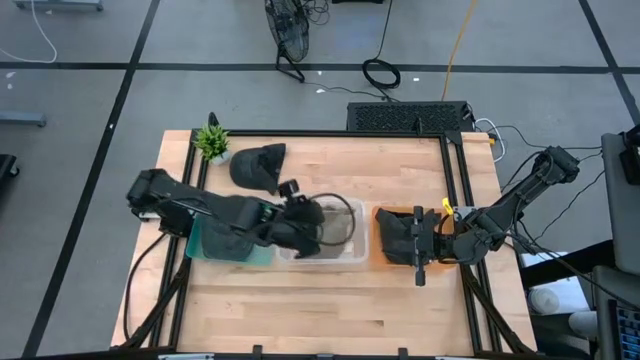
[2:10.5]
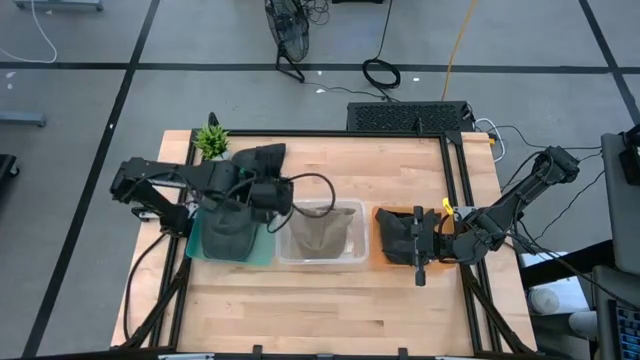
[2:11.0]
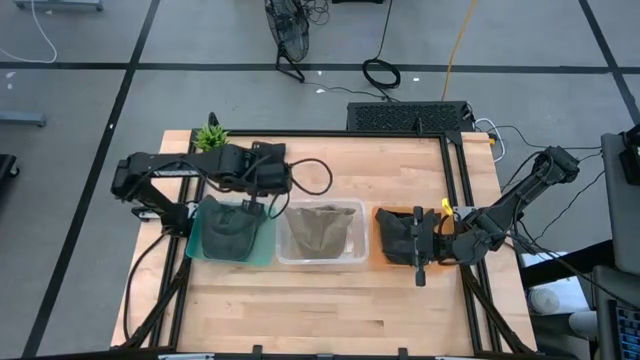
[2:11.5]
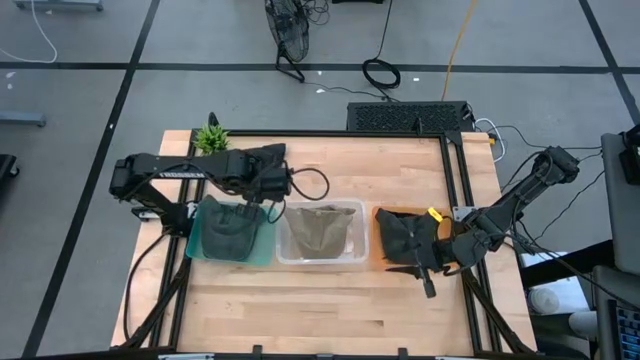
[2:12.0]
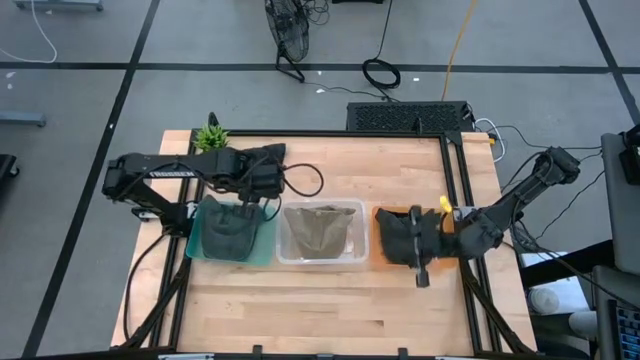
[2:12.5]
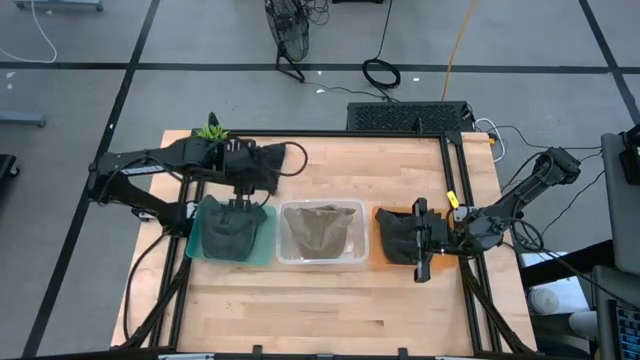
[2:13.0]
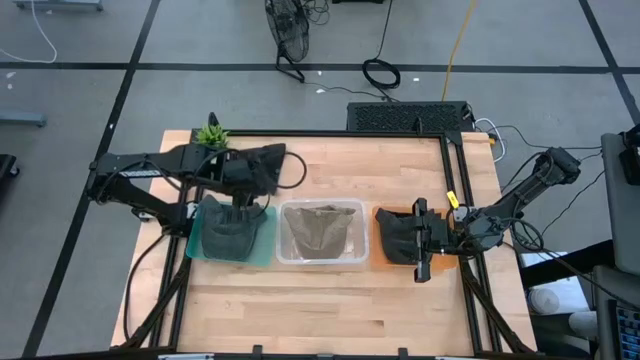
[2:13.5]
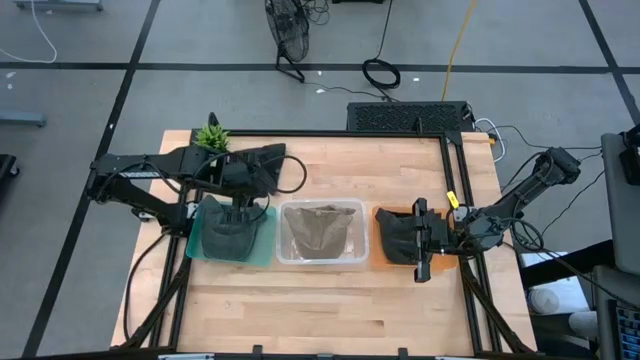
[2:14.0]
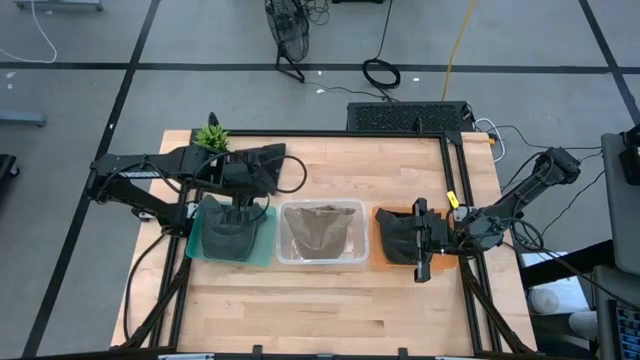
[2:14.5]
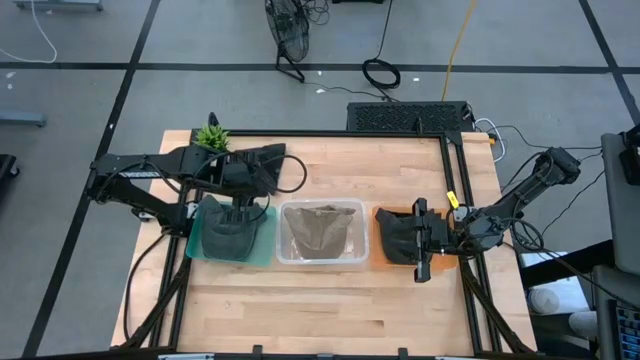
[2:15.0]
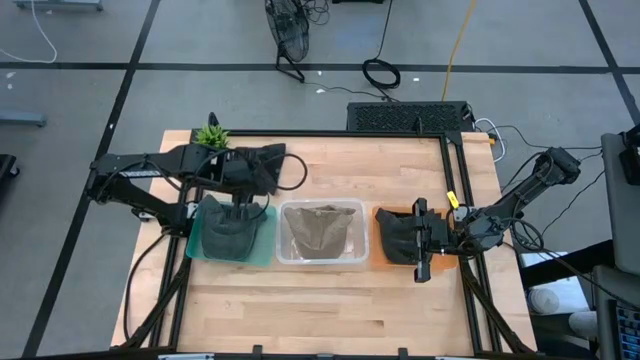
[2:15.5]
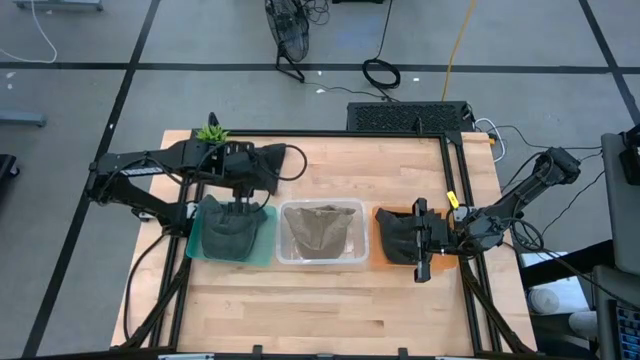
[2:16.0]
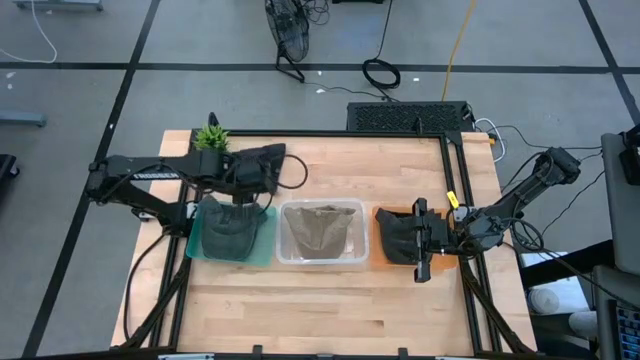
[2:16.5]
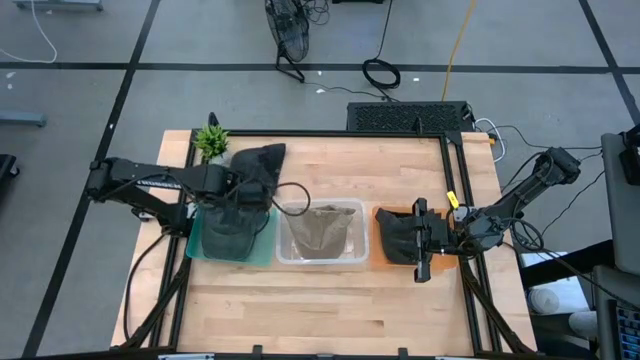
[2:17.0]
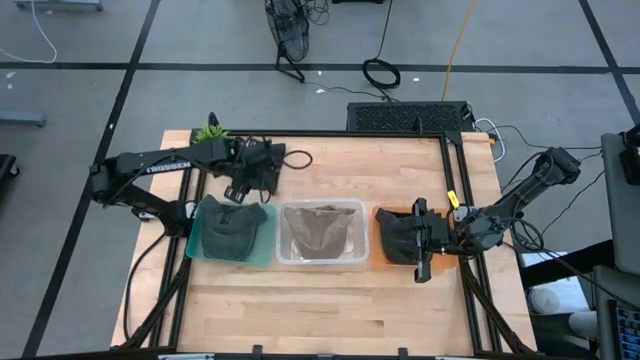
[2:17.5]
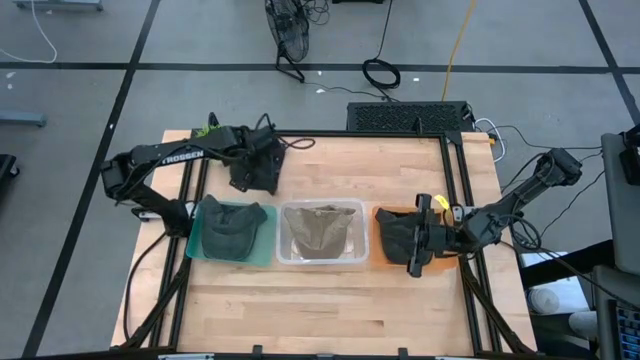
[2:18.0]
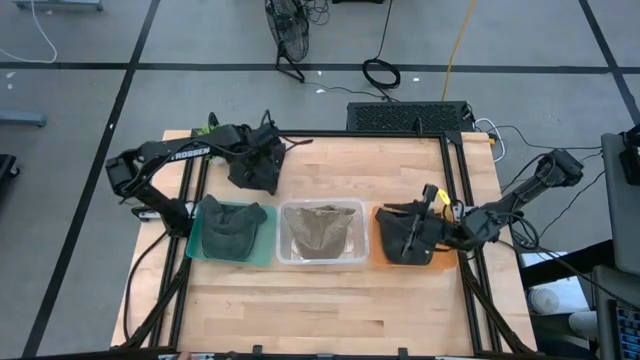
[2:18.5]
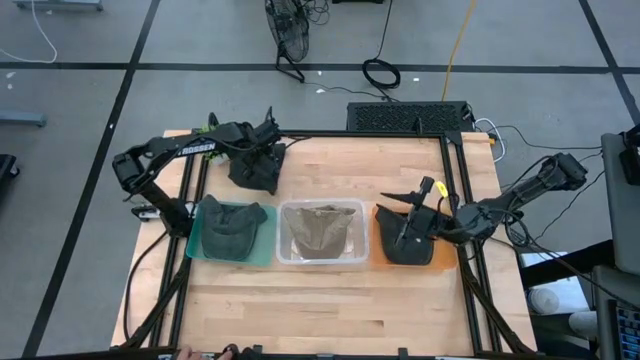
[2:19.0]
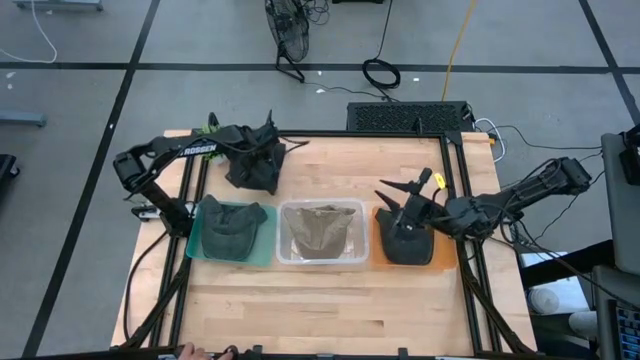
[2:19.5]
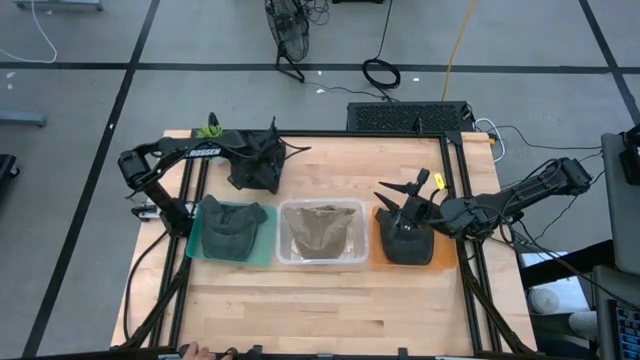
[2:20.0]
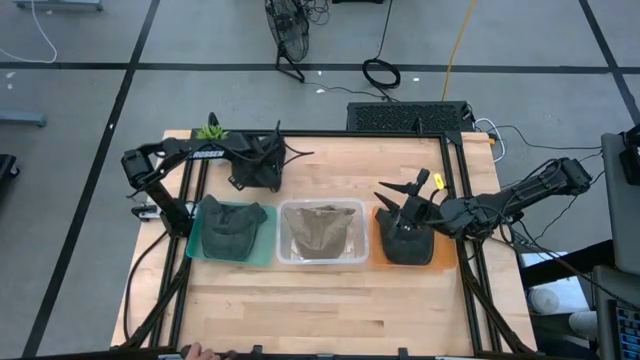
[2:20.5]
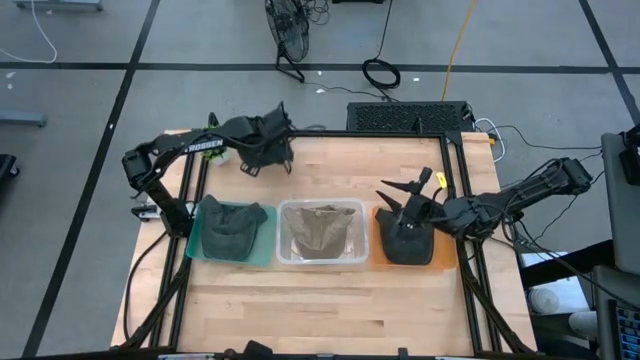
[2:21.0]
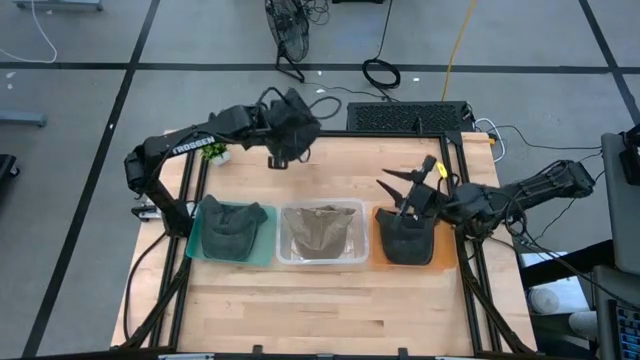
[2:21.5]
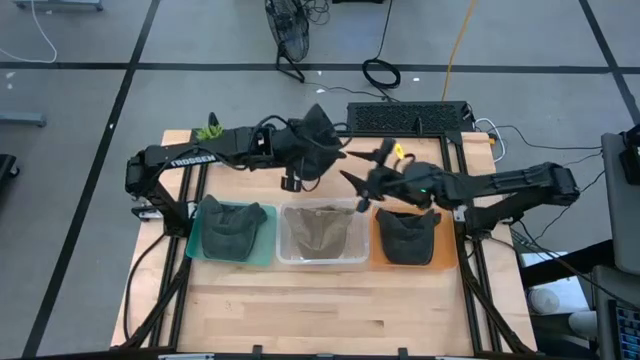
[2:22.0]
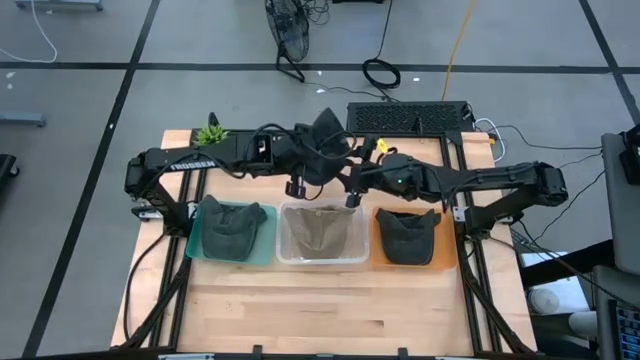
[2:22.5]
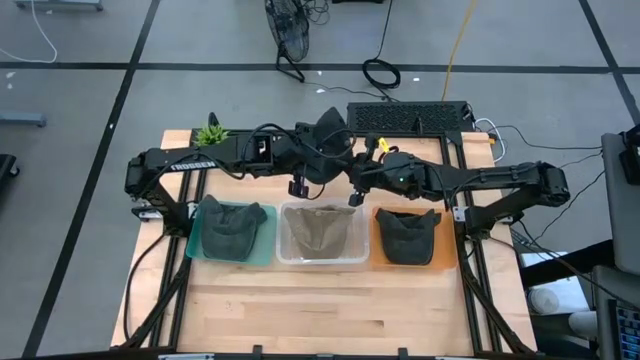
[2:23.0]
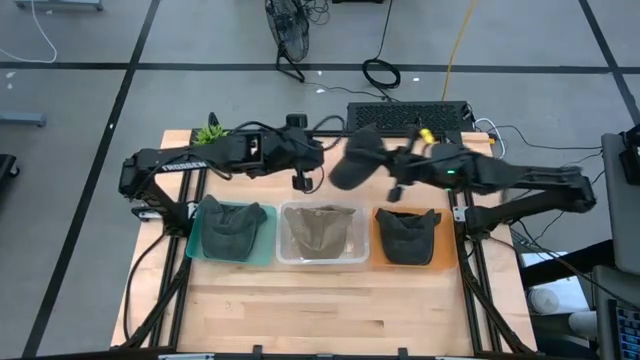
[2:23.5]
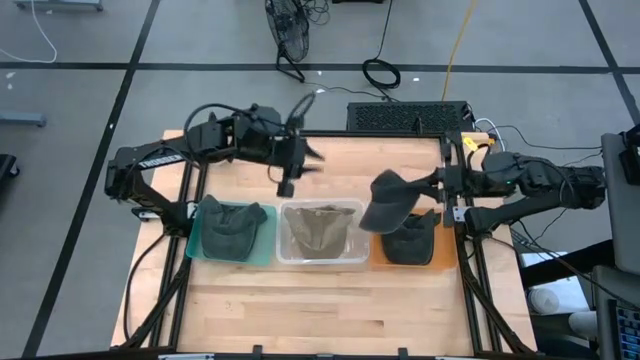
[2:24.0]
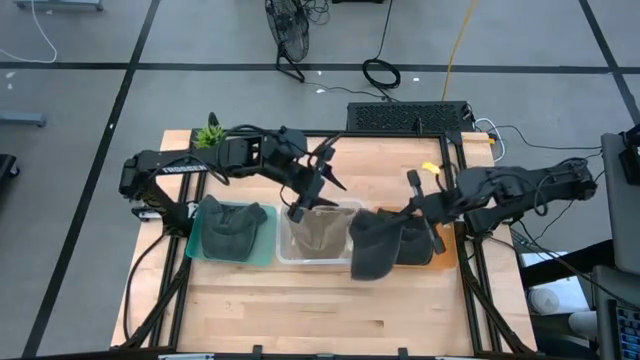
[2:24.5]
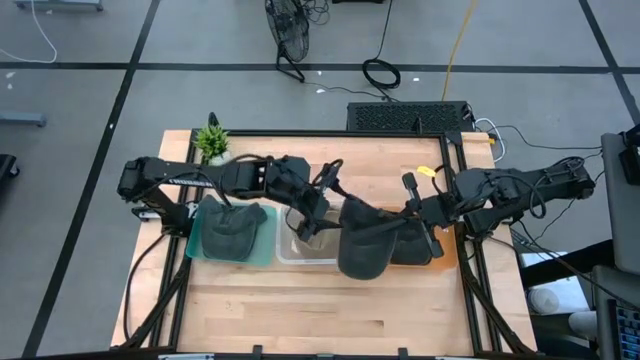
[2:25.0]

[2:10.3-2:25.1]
Task: Pick & Place hat
Put the black cap into the orange bin

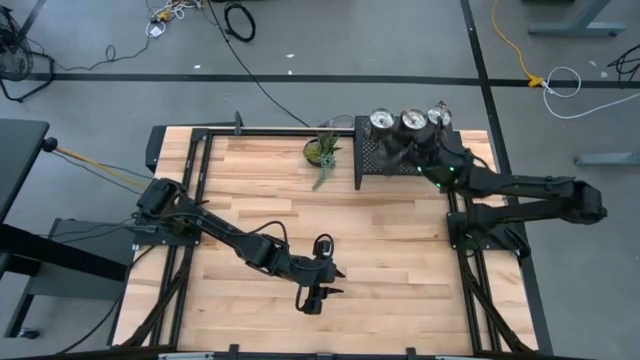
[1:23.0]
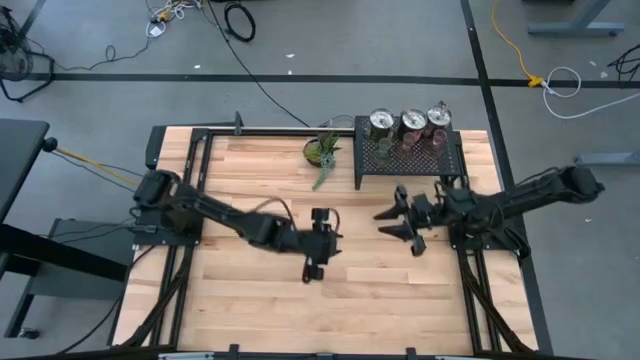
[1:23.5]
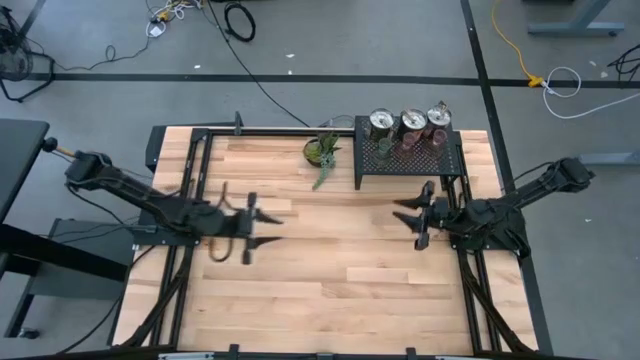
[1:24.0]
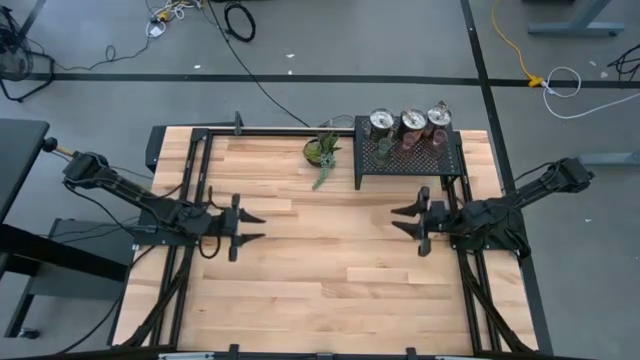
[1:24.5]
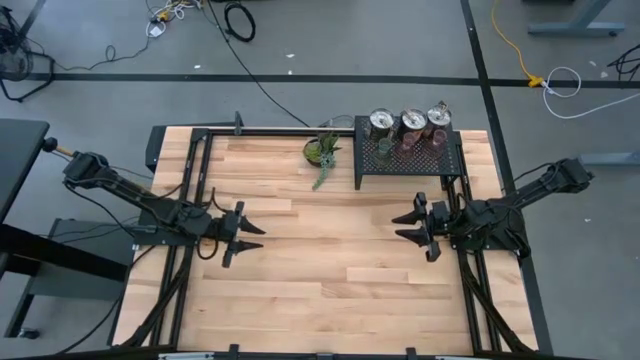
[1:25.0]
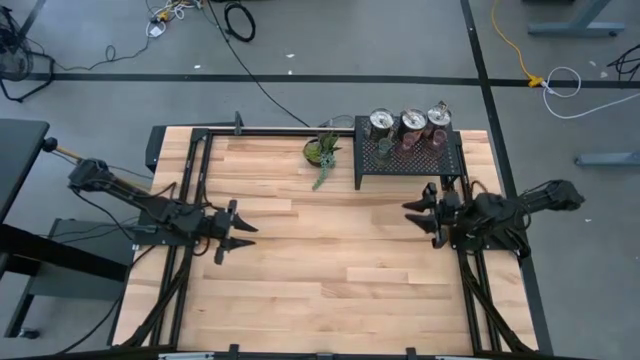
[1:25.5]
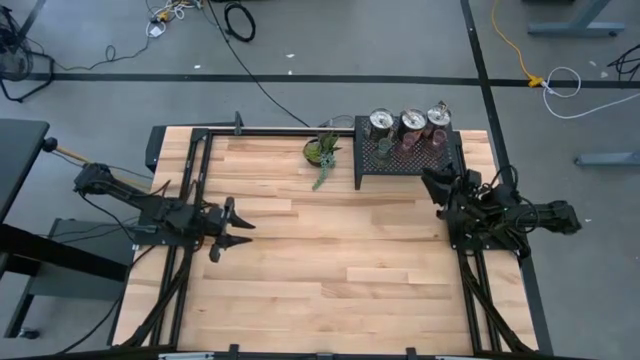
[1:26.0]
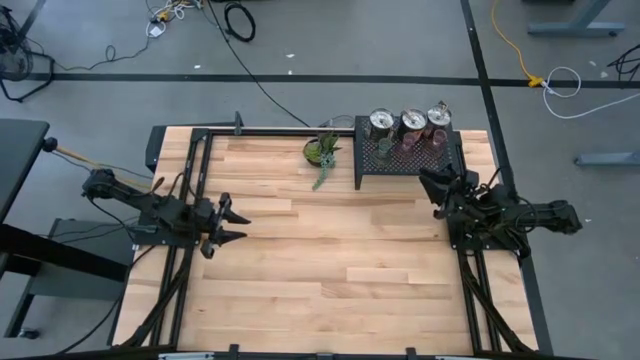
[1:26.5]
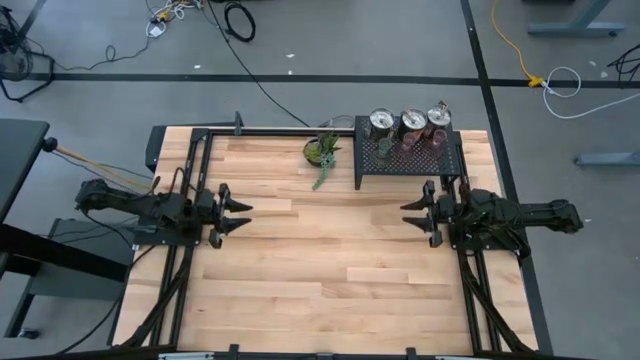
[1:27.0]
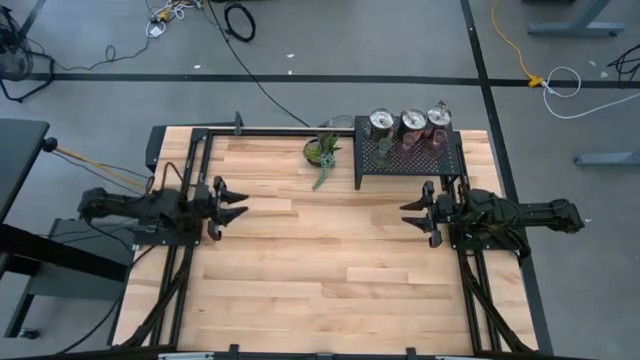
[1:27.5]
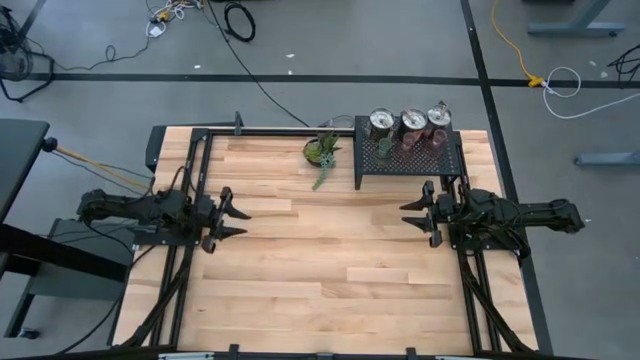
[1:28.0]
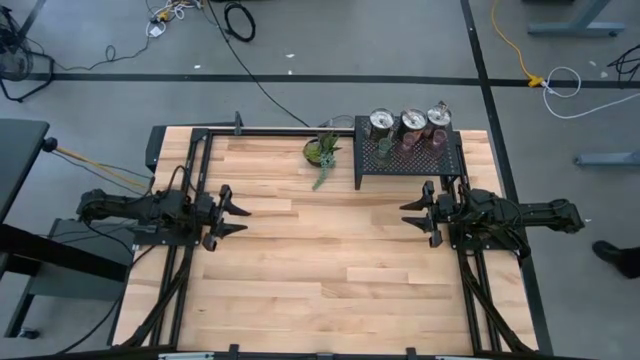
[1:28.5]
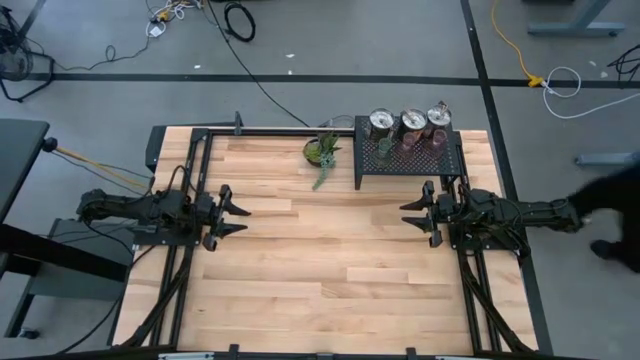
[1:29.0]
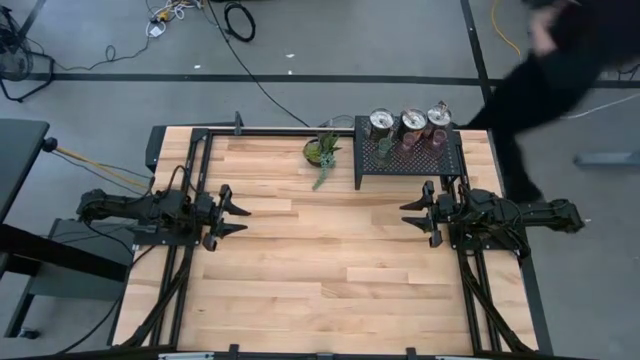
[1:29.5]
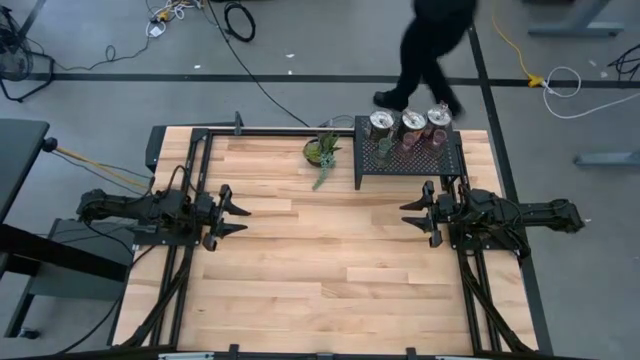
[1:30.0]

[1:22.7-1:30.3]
Task: Pick & Place candle stick holders
Return to Home Position
